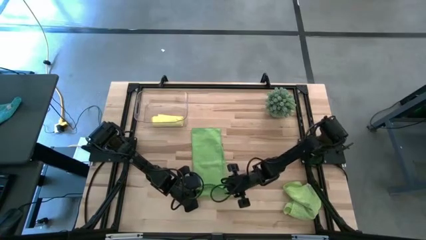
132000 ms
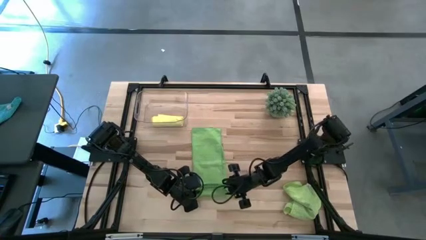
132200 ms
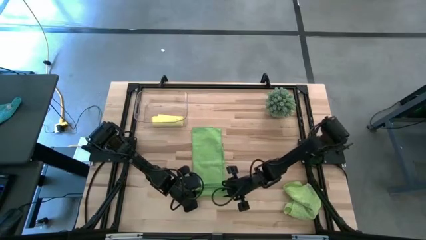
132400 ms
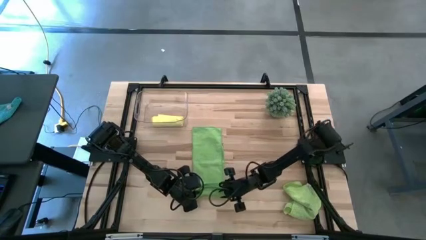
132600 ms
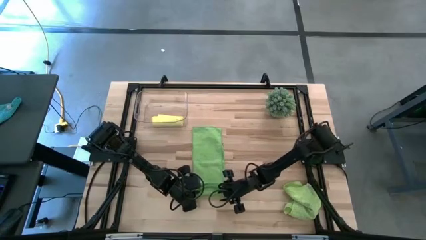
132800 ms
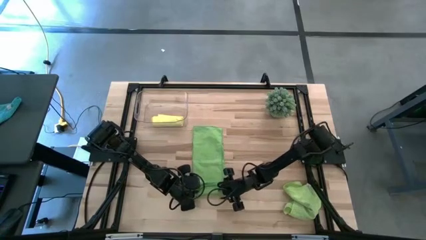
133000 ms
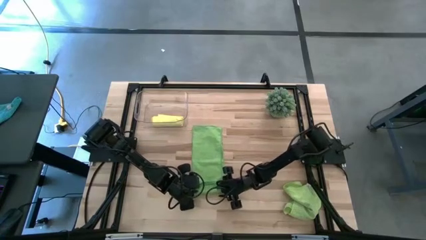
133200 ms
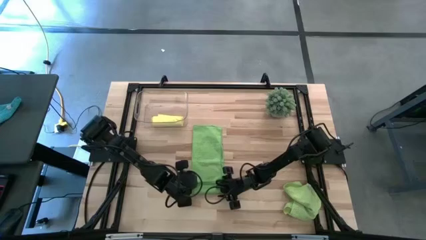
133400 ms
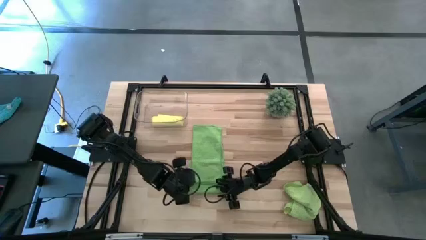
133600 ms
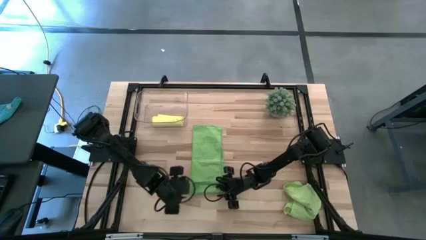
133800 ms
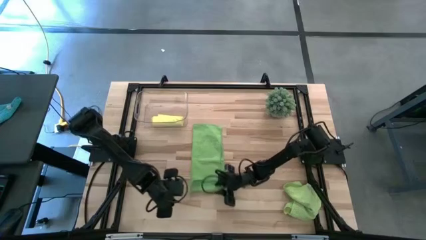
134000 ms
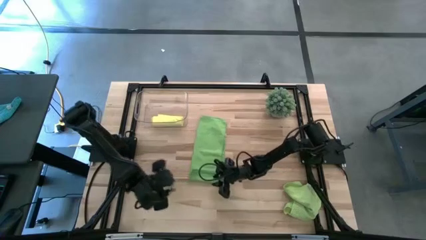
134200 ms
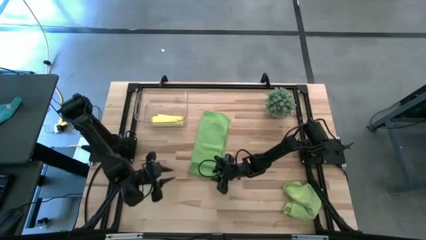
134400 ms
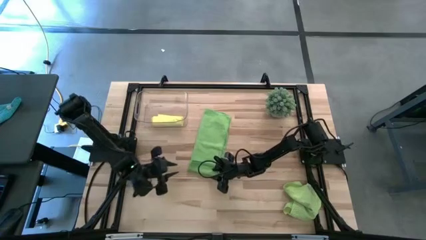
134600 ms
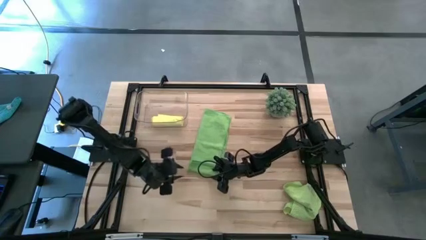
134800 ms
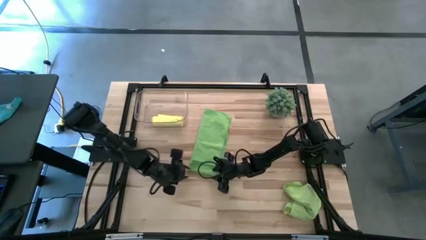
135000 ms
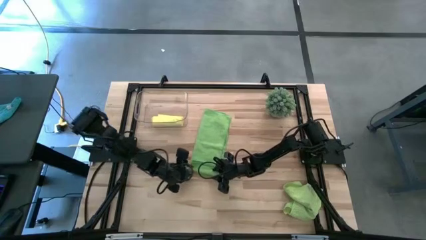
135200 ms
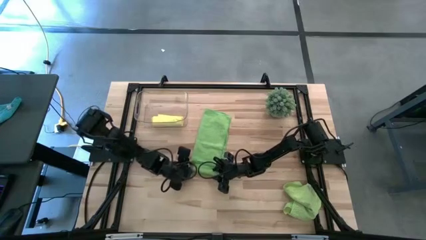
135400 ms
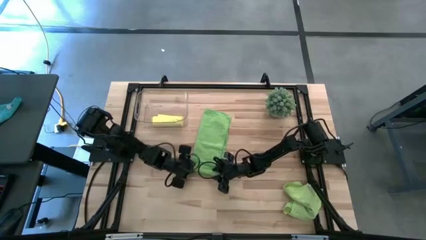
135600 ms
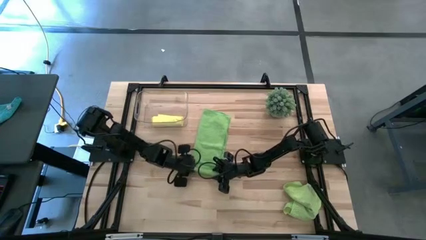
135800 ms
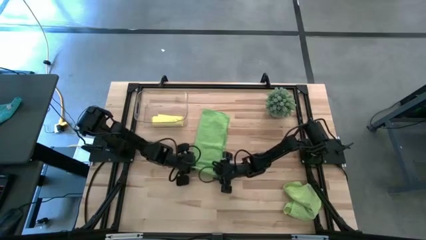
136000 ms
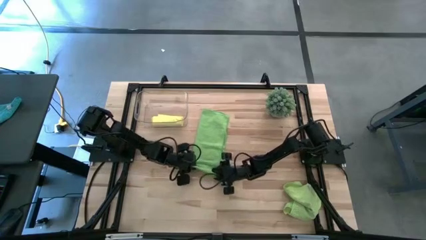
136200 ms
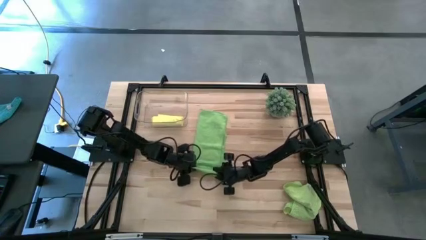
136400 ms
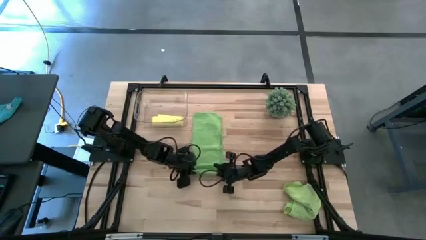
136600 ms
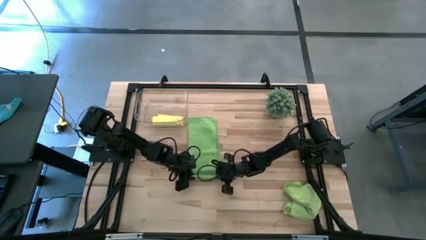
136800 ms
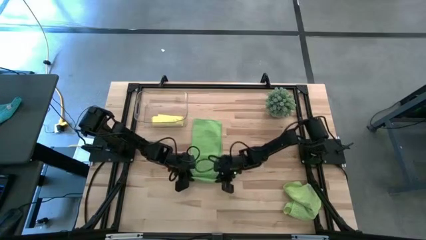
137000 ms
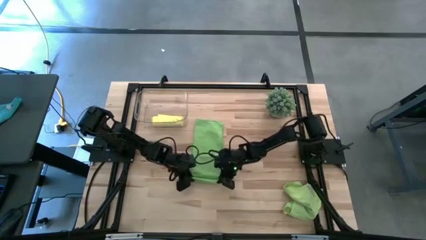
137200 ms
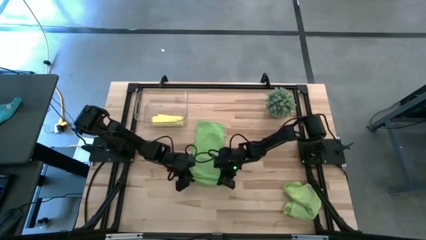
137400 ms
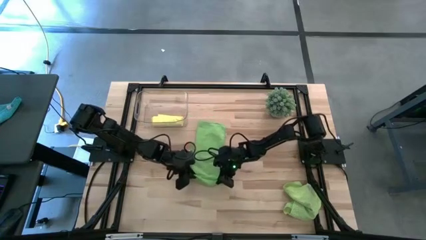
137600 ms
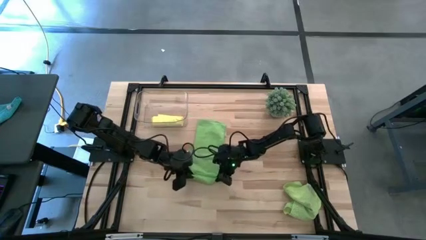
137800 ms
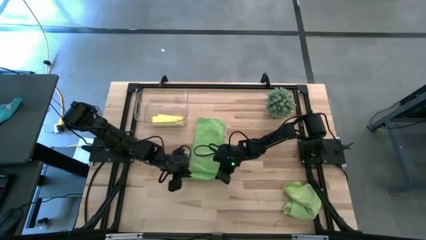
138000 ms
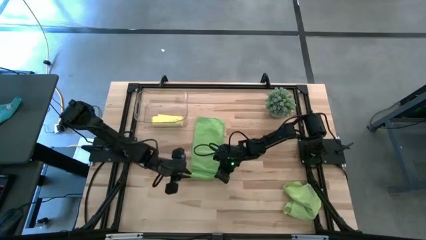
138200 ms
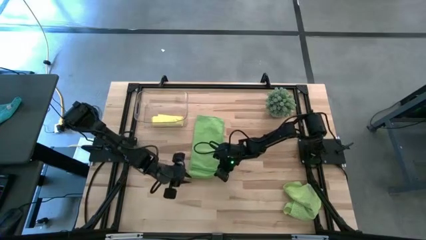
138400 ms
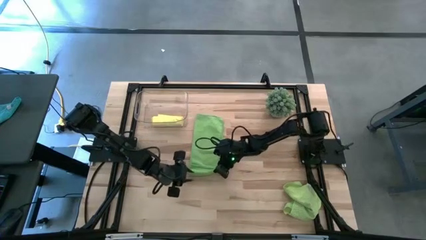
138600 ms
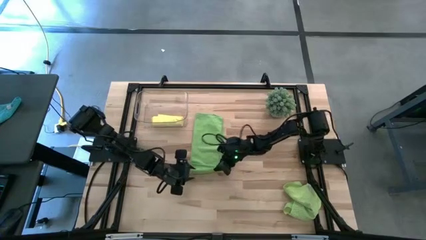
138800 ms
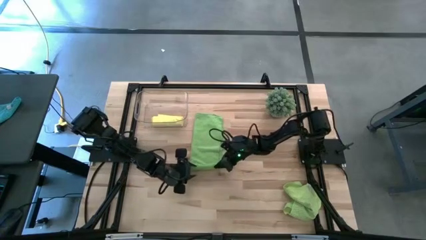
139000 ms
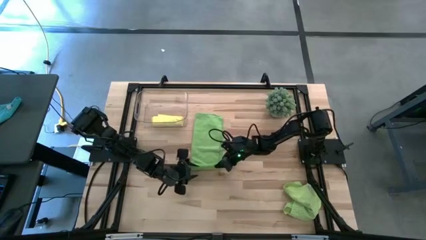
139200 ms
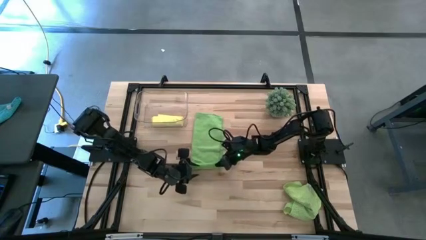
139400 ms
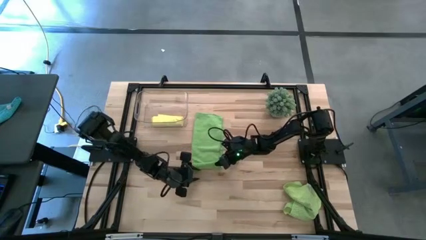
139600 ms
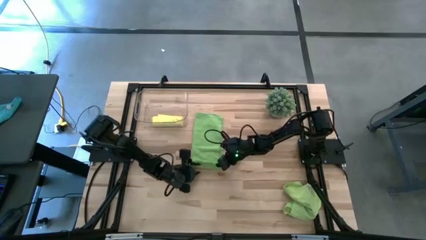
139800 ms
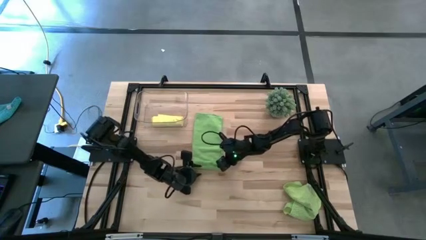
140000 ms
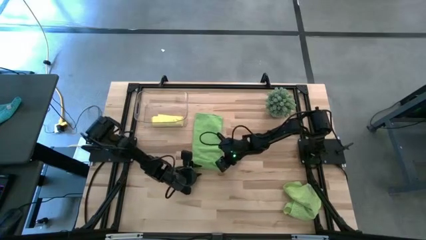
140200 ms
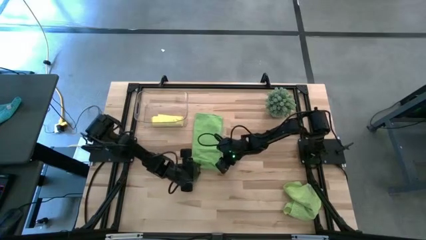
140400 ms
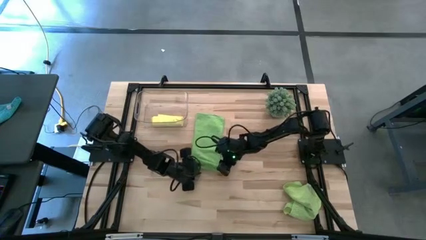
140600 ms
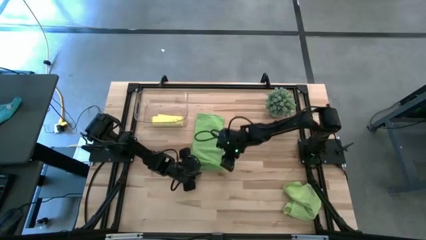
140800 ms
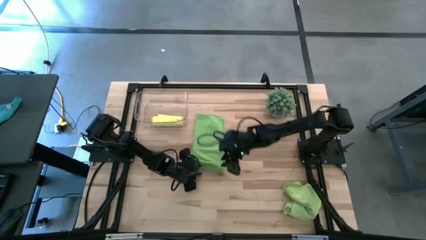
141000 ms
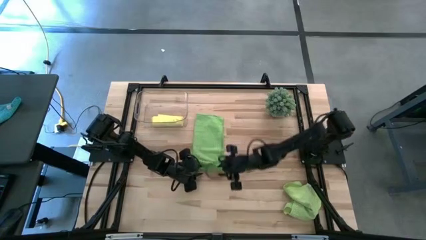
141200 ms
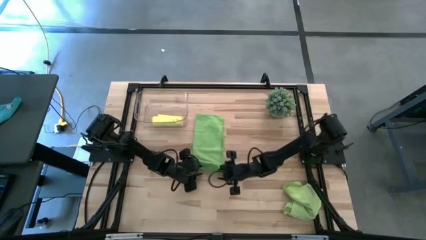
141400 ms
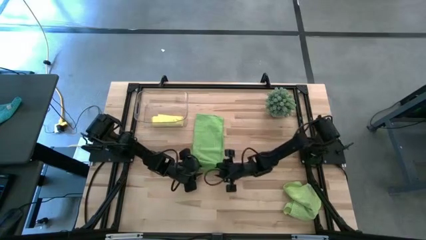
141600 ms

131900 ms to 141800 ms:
Task: Roll microfiber towels into tight, uniform cylinder then place into a basket
Roll the green microfiber cloth

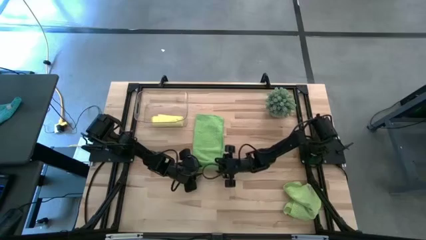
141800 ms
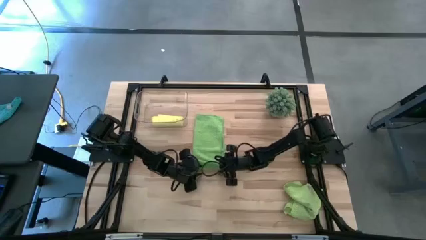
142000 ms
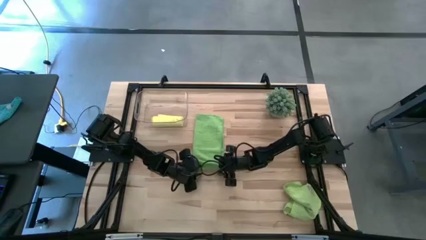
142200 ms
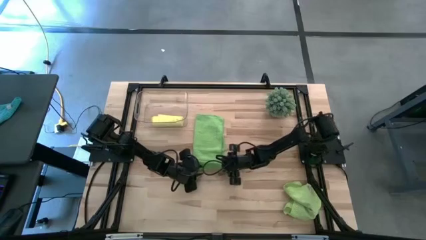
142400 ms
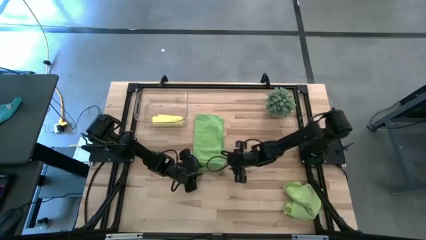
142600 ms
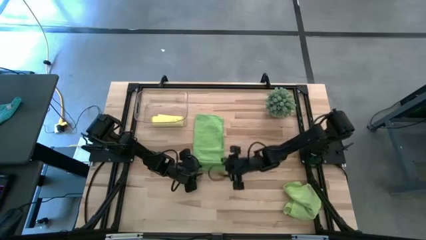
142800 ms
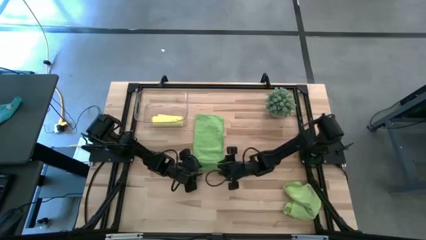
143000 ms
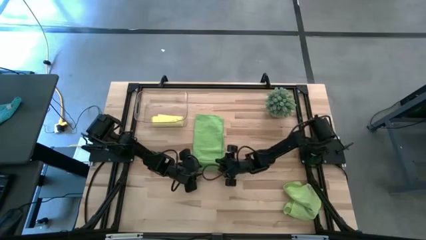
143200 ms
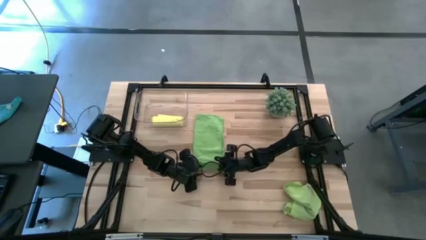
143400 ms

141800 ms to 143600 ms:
Roll the green microfiber cloth

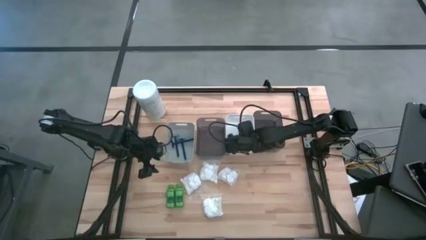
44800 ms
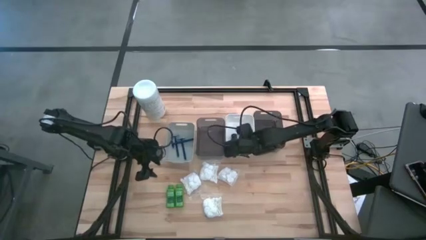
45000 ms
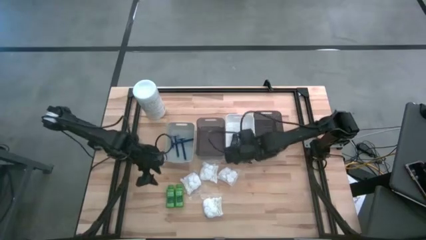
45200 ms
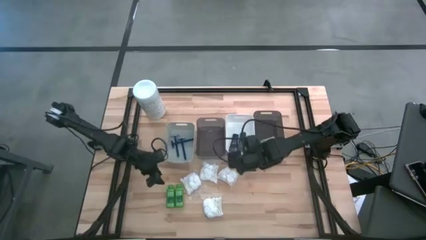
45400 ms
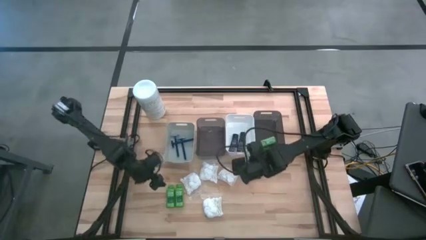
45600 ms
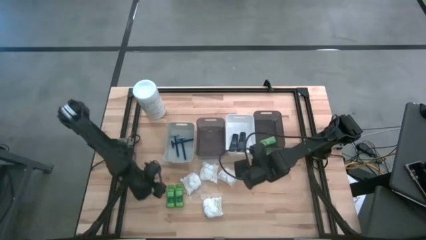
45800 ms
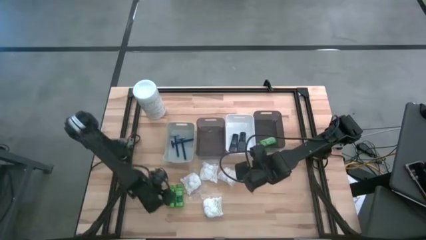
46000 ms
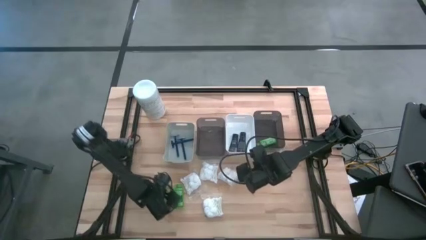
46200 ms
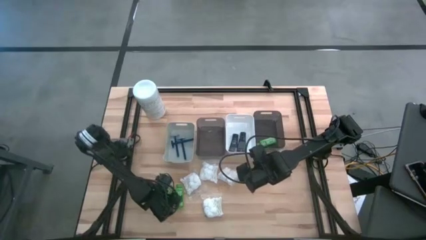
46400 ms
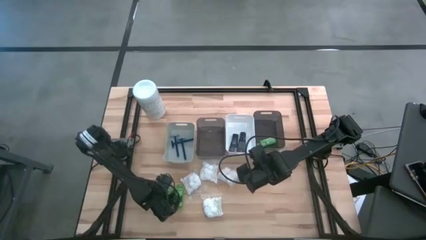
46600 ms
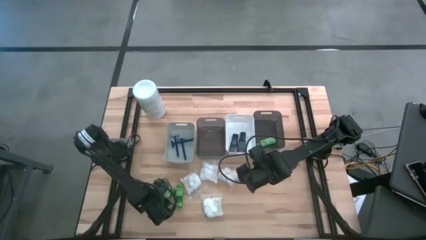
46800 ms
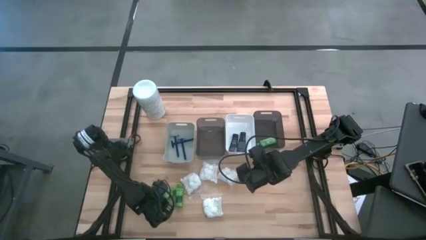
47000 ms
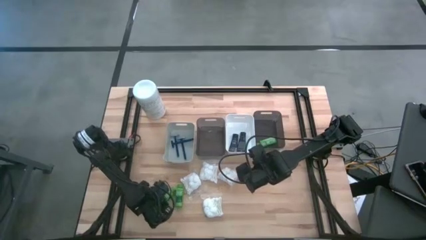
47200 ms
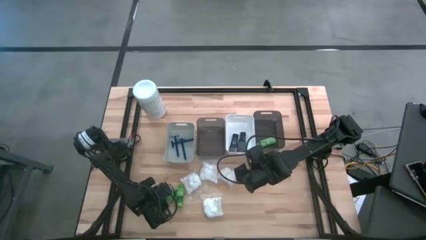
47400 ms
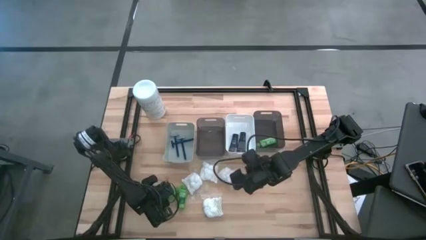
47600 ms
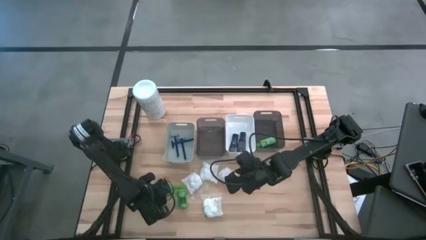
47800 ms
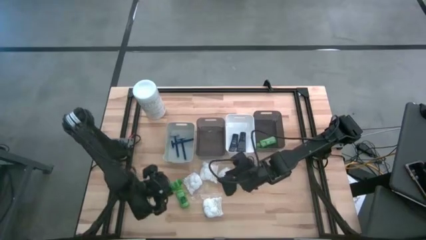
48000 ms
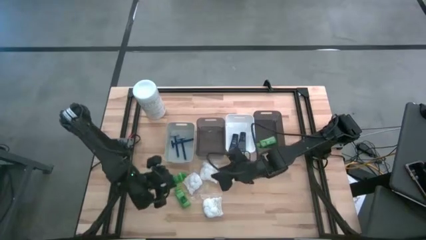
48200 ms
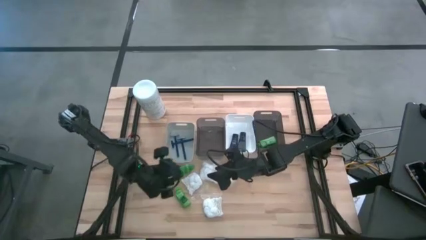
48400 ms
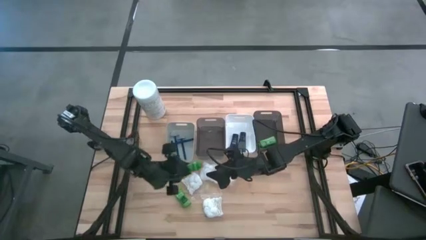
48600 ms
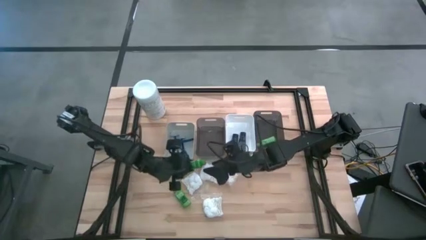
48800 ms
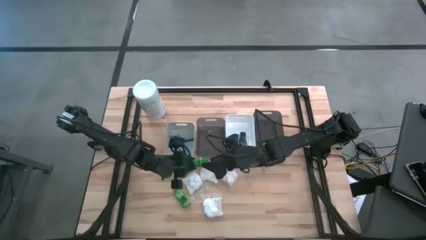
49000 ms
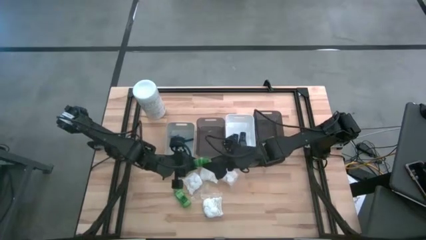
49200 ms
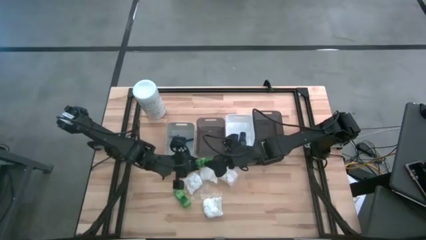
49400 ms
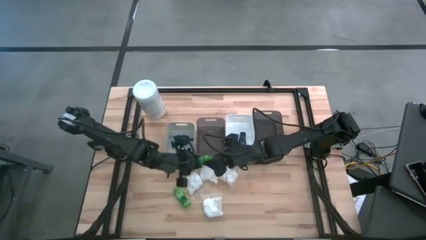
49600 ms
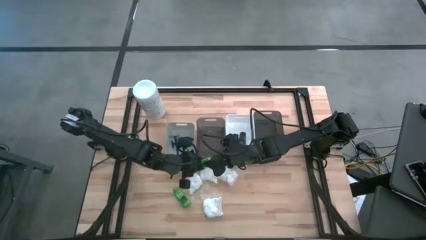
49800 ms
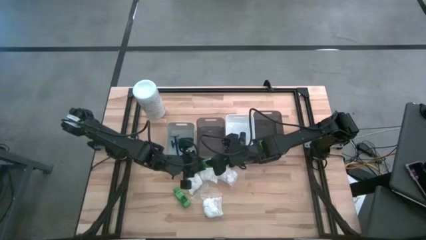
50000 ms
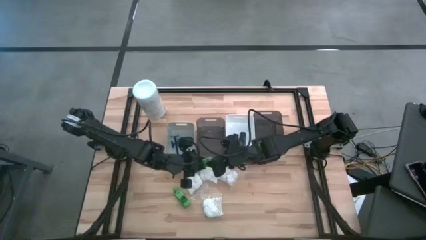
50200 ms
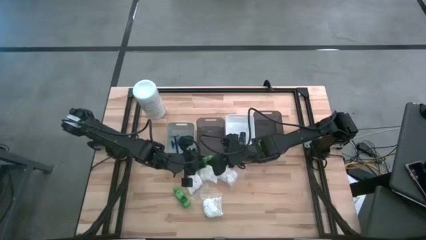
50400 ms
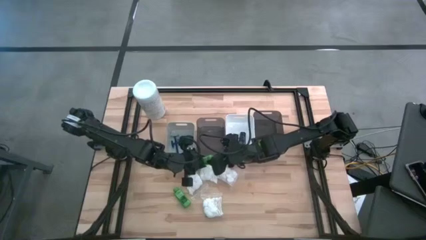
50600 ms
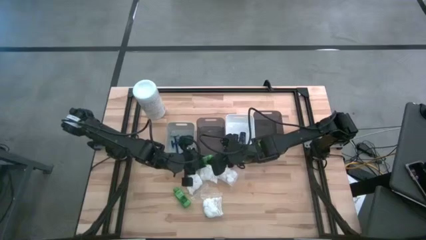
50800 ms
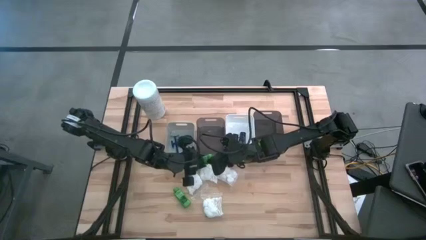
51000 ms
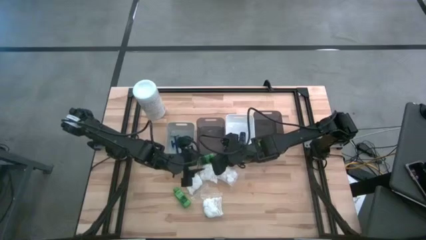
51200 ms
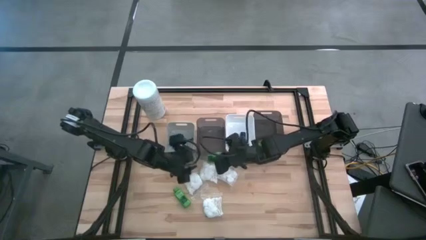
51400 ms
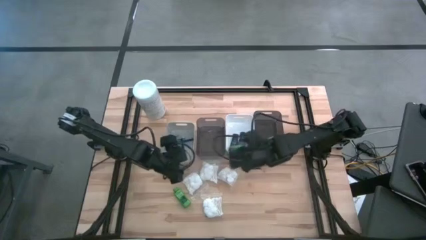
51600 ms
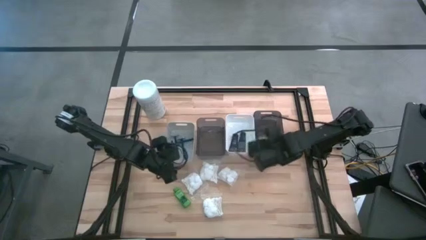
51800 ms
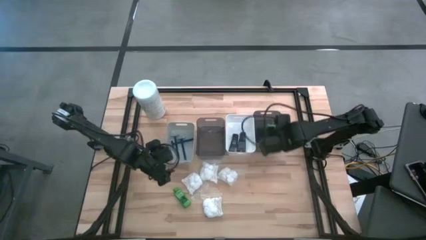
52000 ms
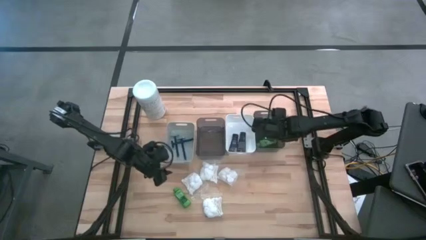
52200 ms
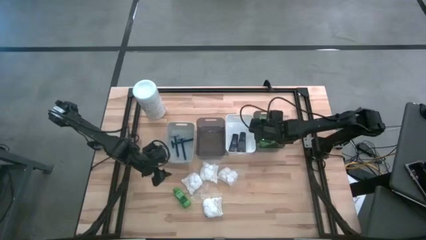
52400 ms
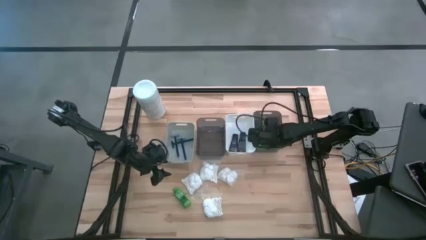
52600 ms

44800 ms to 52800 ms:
Task: Pick & Place Travel size toiletries
Put the left shampoo into the right black bin
